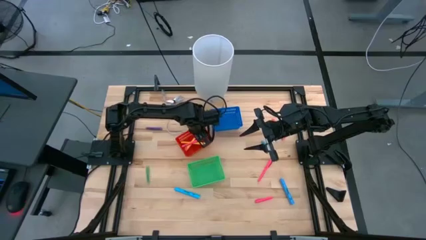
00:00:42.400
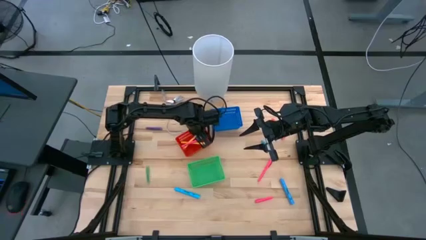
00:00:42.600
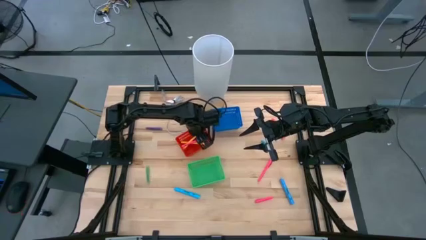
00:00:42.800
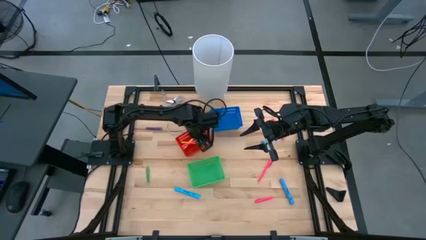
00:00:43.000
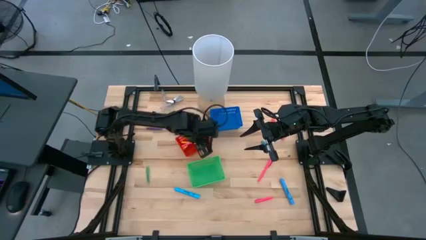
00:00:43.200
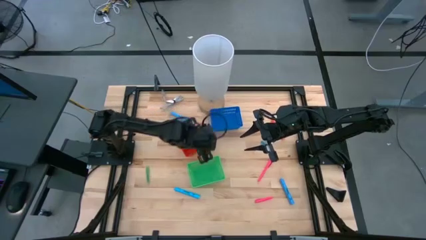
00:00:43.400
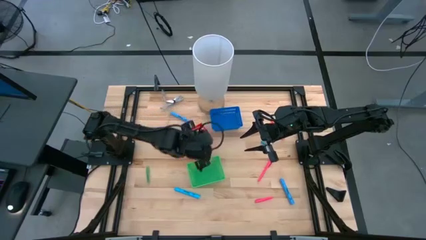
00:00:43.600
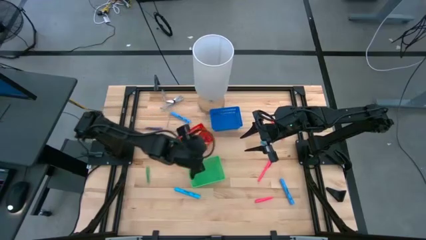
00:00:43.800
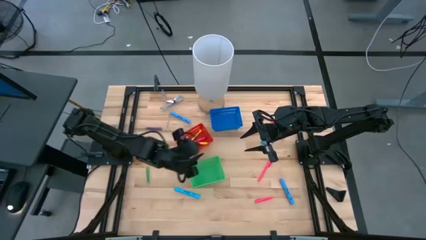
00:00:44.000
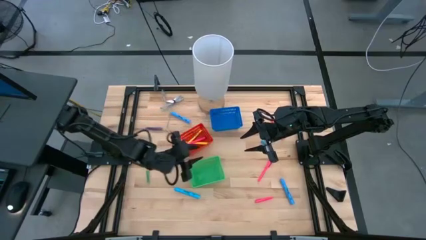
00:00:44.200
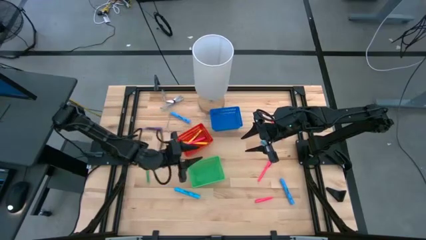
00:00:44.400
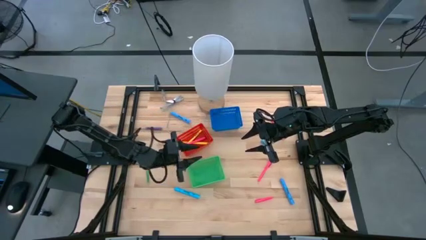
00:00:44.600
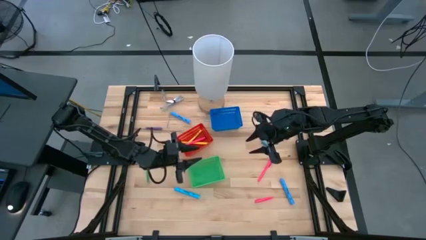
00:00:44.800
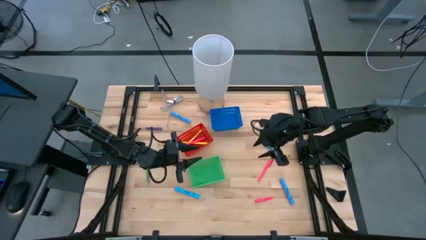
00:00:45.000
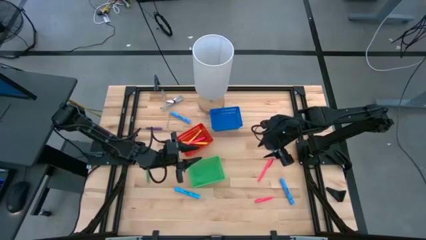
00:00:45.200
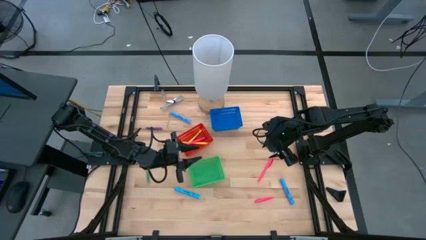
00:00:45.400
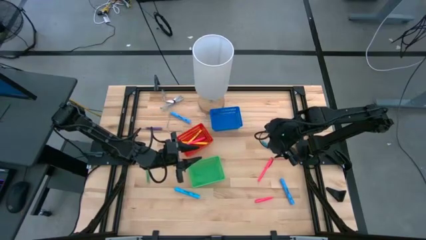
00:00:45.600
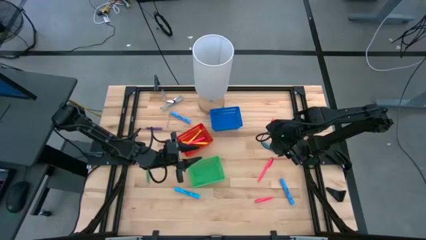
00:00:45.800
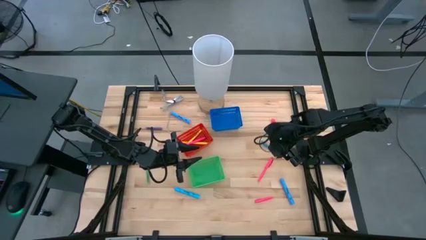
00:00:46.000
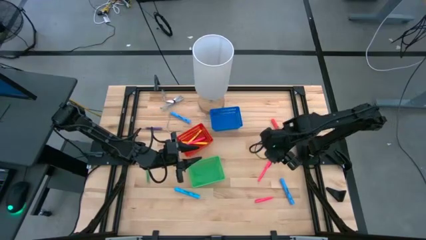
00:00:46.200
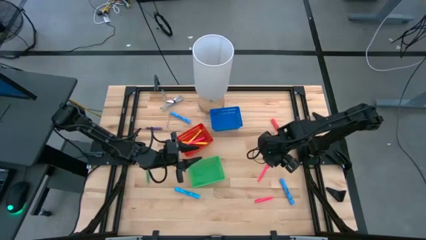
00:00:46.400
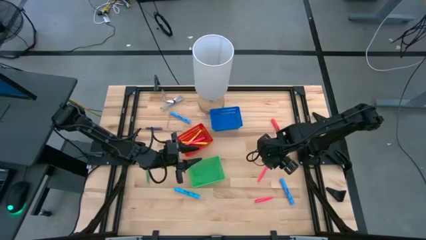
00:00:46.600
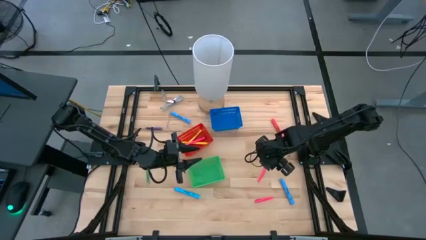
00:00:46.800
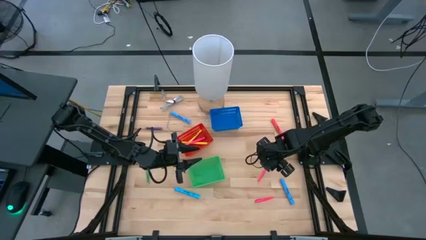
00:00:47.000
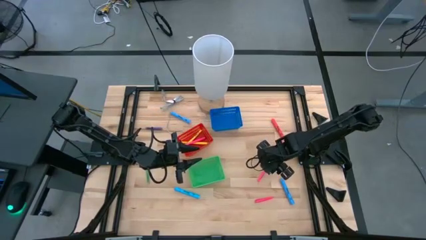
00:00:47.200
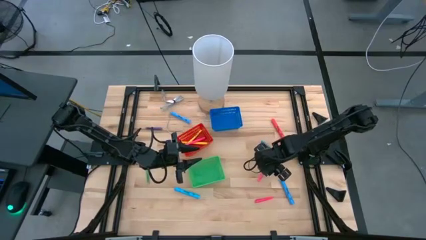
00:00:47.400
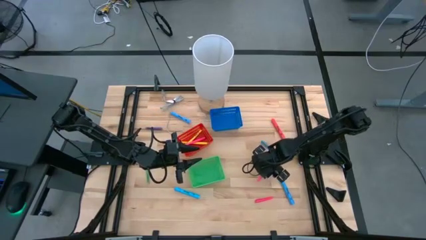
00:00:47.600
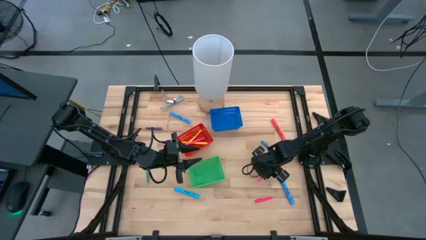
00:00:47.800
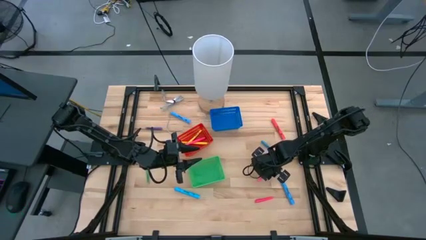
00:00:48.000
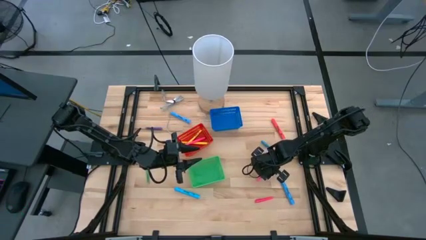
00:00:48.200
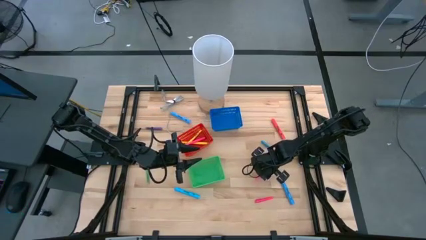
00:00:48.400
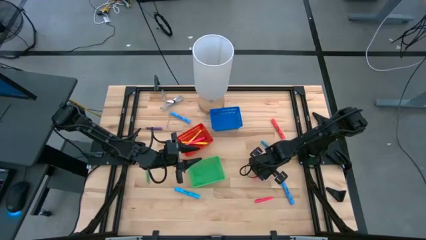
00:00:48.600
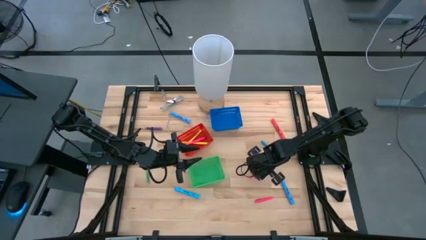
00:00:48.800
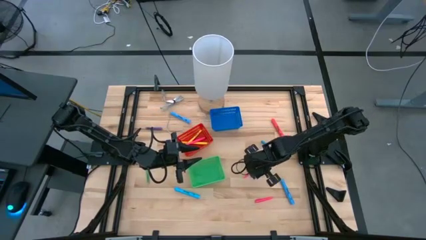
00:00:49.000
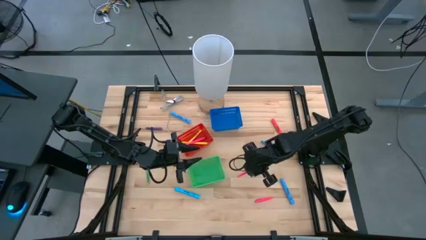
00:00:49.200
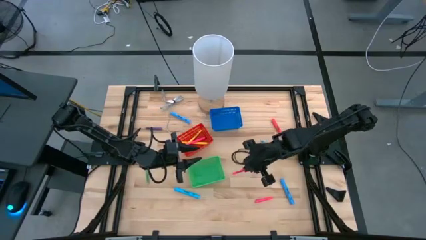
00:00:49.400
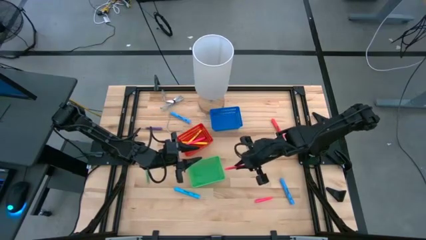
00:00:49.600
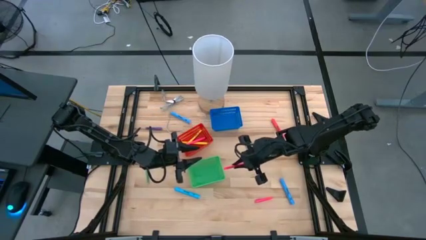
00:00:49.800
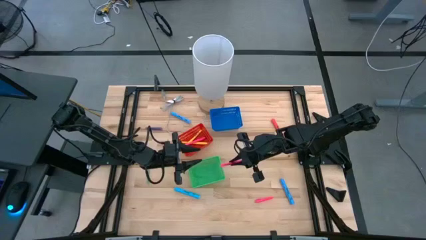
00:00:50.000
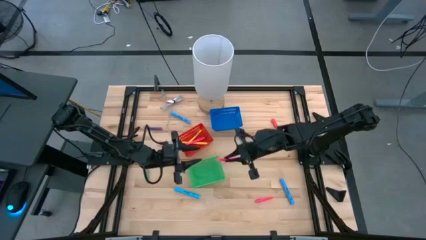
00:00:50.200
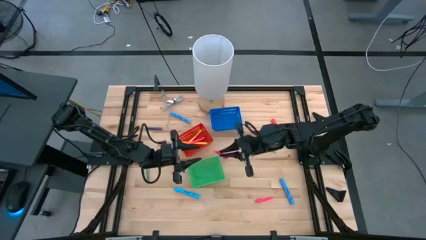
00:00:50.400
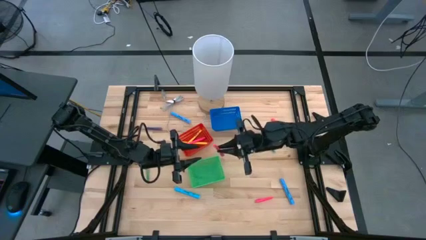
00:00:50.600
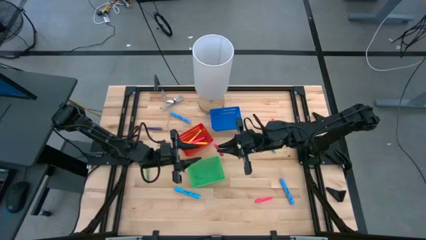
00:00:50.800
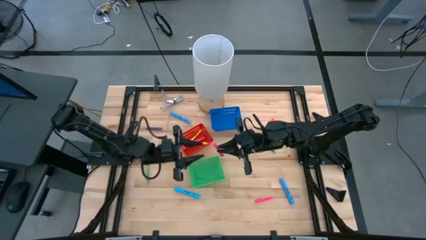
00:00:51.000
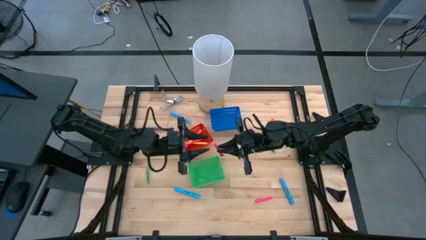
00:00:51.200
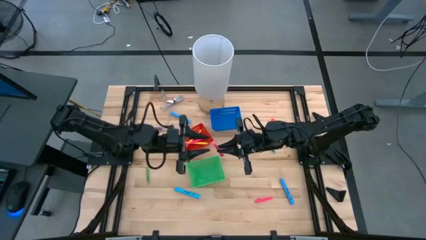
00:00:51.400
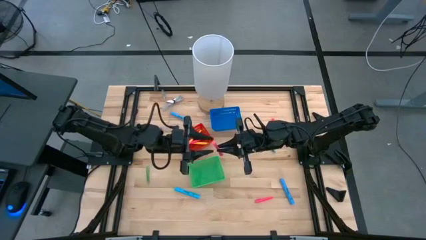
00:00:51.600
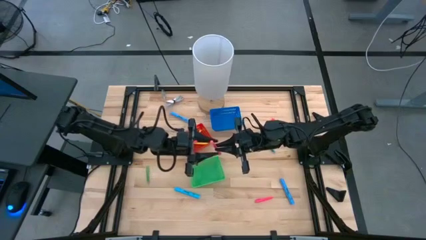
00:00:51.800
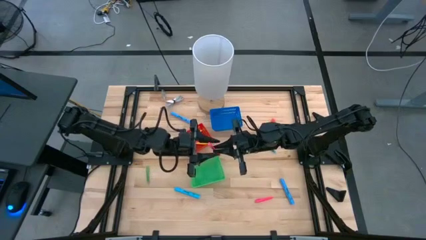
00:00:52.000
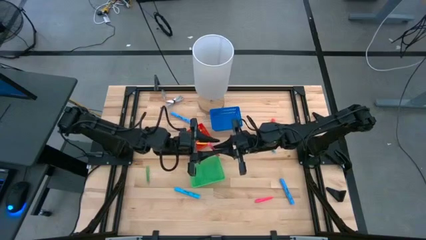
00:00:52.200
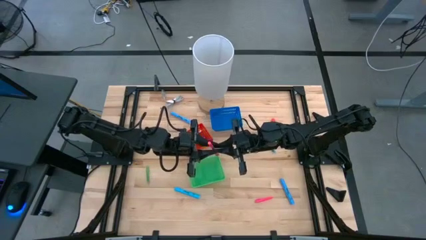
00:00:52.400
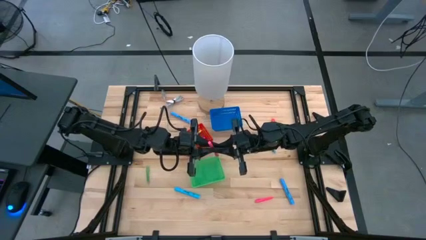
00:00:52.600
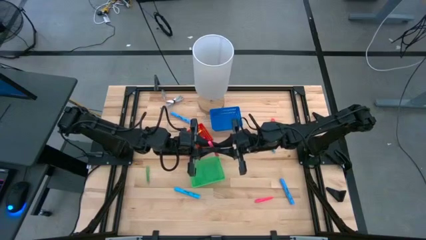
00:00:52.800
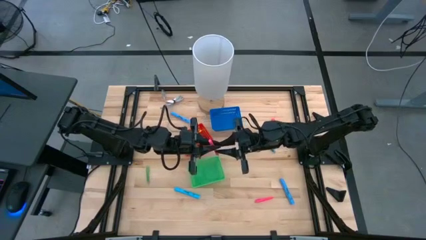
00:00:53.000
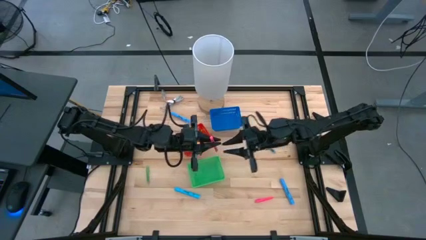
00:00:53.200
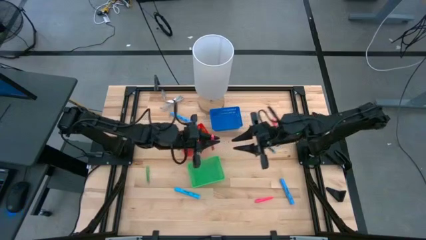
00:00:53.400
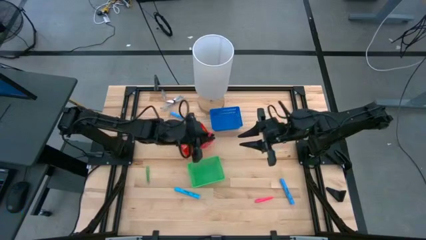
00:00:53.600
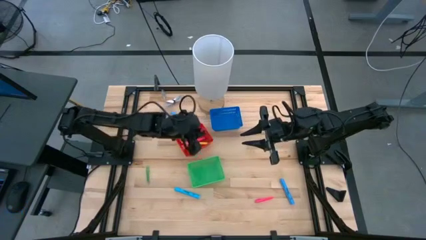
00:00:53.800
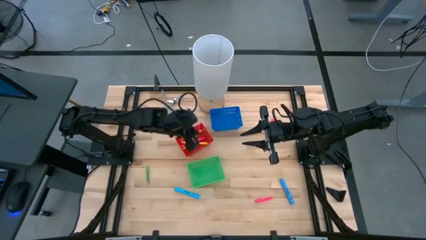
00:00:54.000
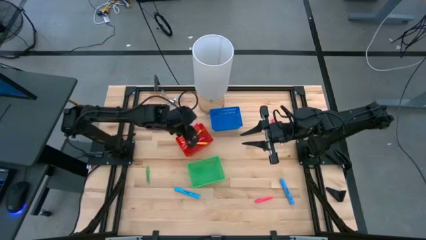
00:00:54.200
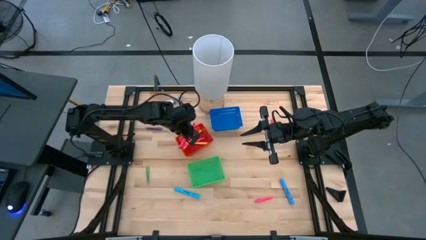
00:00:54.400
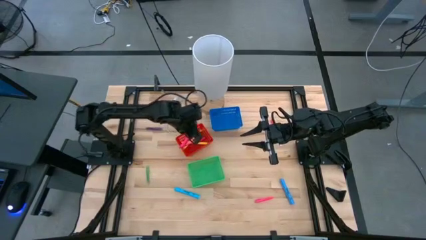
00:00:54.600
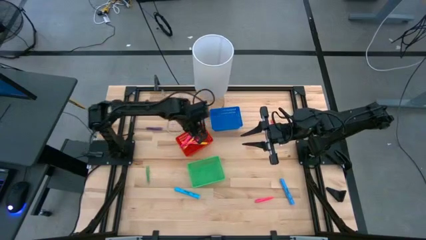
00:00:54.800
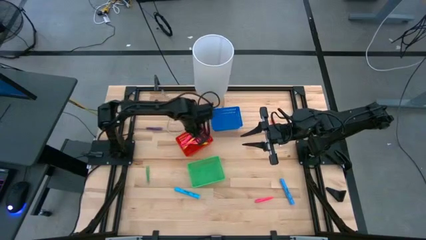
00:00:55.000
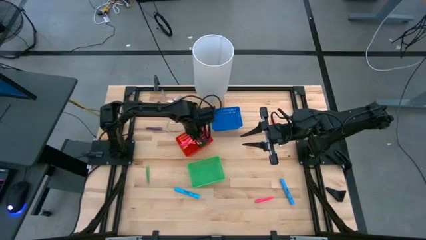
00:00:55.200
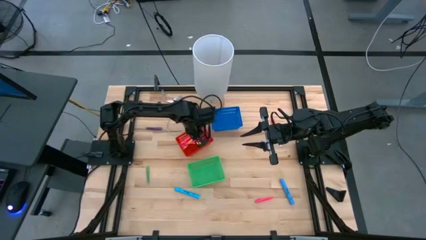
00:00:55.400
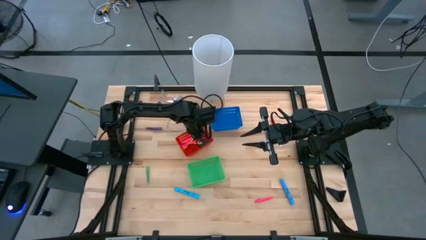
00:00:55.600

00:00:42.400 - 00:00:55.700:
Task: Pick & Place Markers
Put the pink marker into the red bin

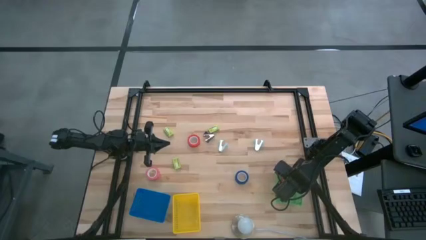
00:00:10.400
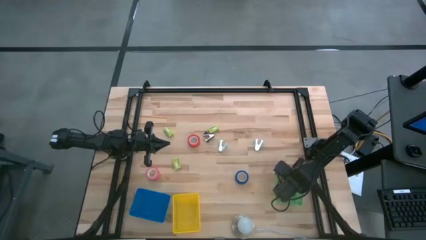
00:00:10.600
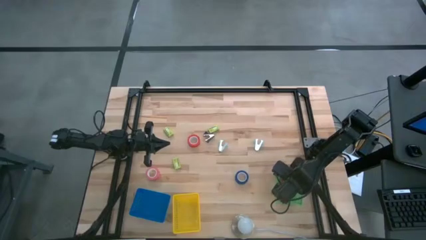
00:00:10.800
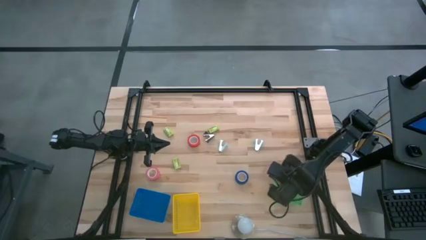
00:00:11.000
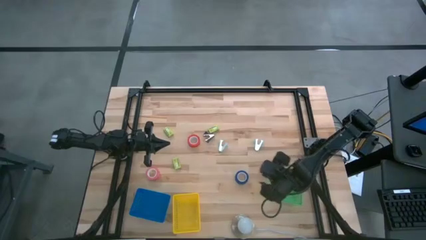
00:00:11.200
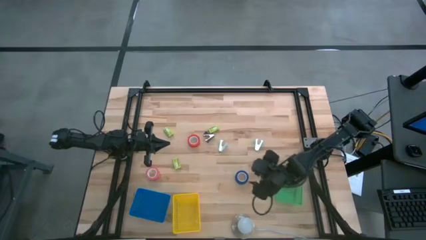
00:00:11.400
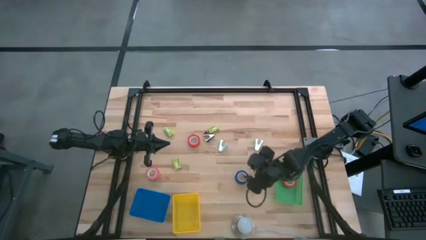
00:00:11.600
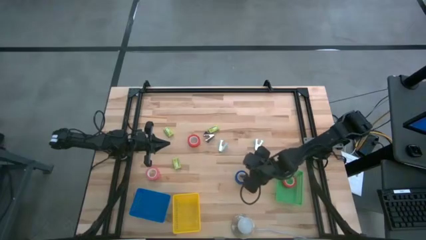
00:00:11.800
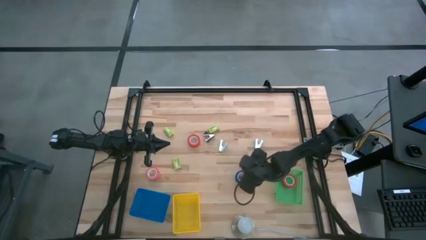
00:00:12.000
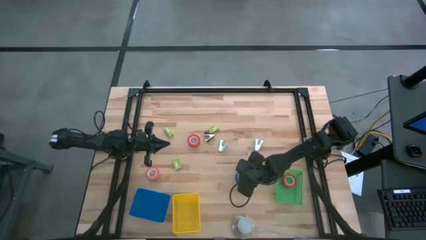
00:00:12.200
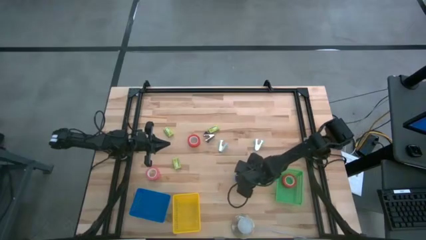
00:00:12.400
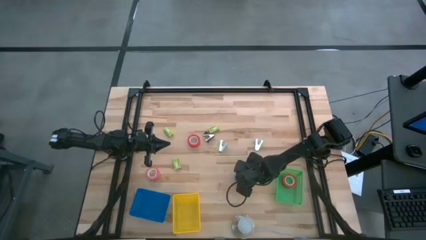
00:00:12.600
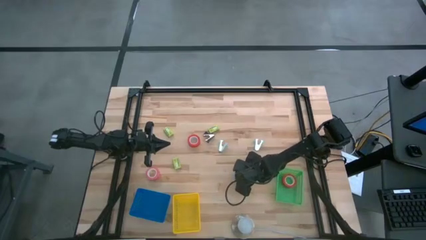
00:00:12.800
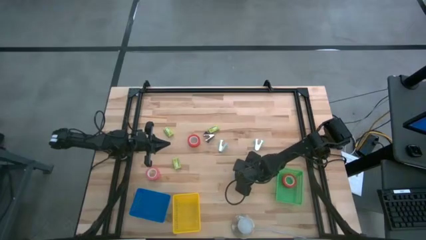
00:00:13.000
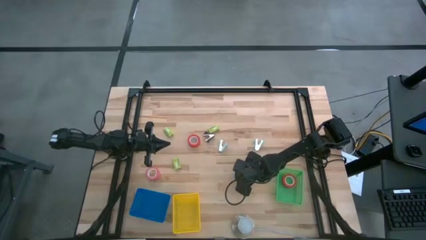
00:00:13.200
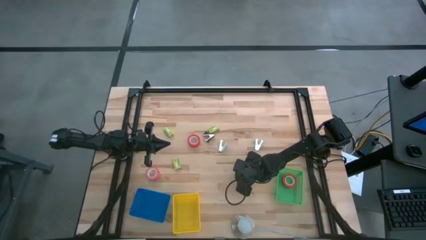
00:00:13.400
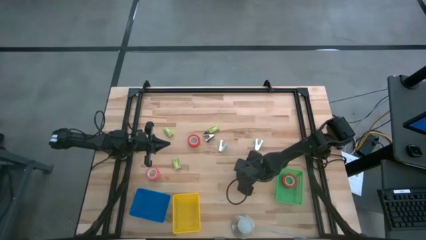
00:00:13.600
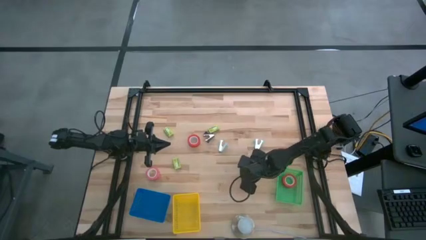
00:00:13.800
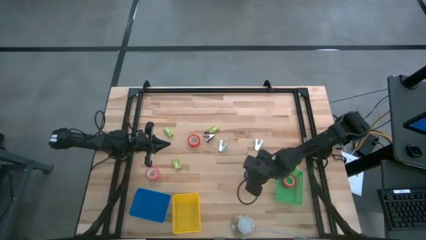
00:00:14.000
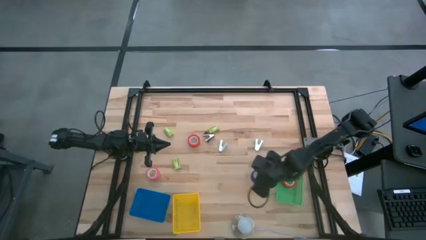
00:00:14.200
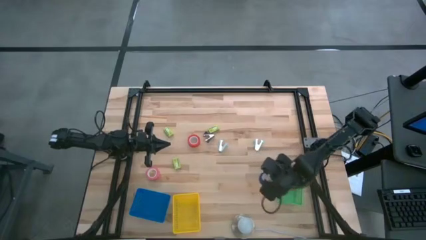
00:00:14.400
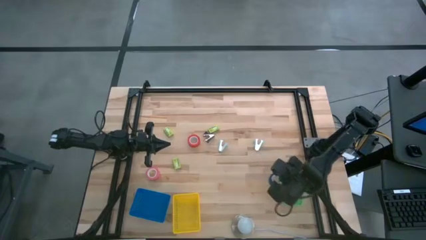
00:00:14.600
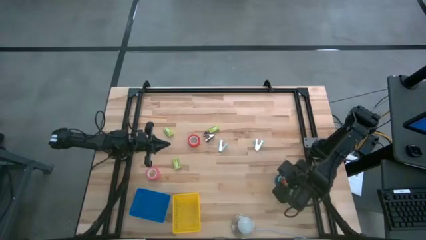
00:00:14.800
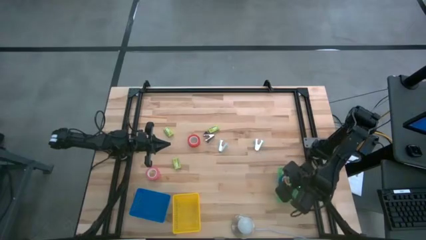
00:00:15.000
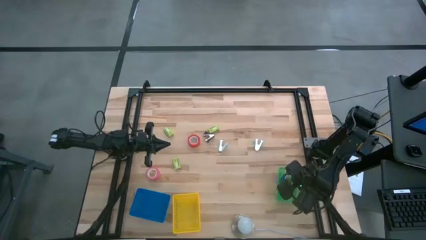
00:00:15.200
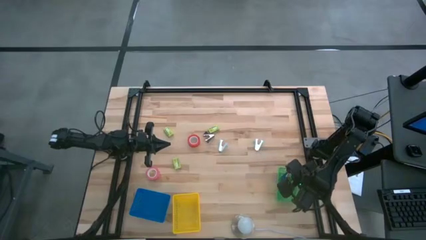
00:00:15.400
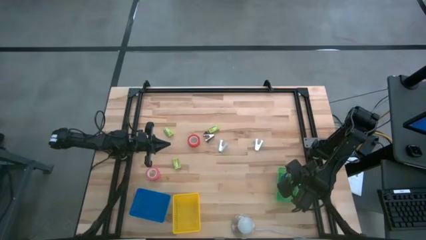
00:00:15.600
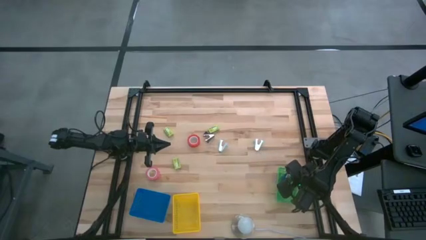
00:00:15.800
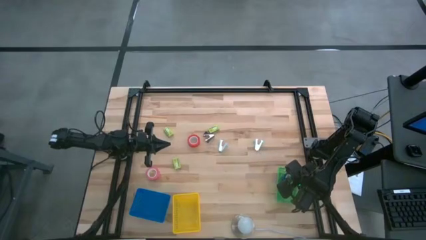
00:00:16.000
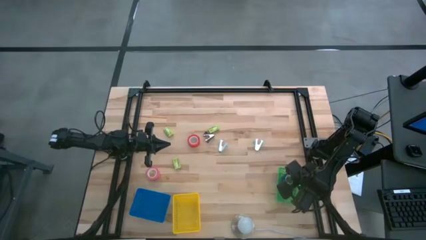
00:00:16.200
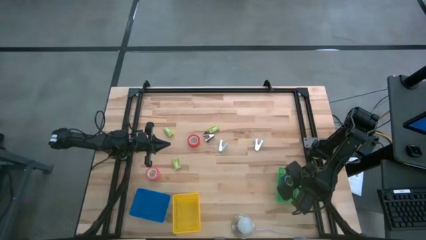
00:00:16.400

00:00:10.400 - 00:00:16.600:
Task: Pick and place Stapler, Stapler remover, tape
Put the blue tape into the green basket
